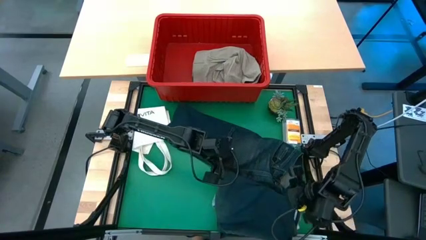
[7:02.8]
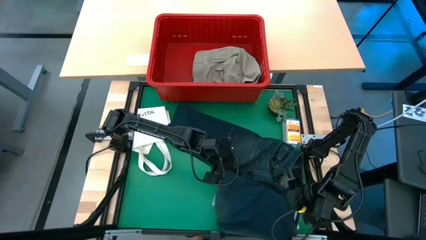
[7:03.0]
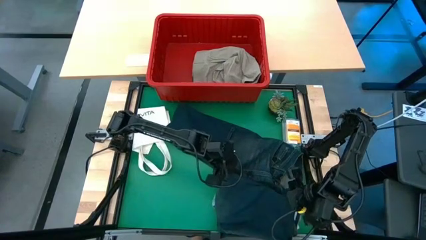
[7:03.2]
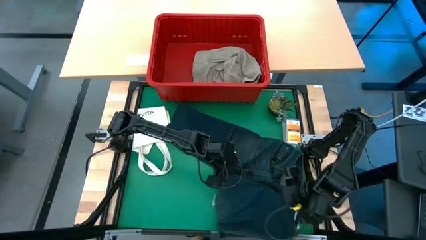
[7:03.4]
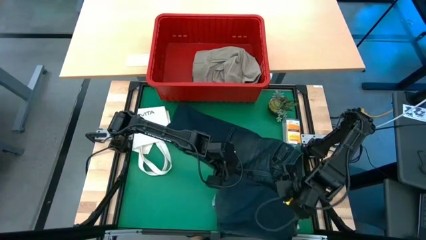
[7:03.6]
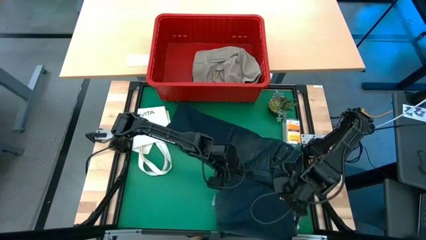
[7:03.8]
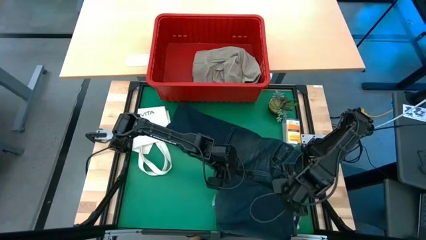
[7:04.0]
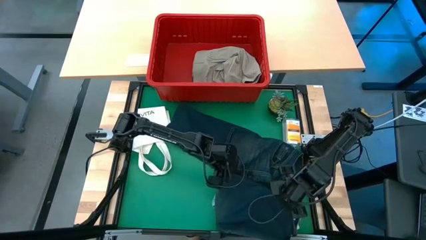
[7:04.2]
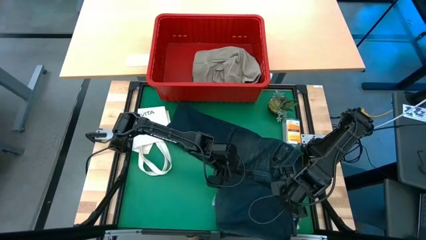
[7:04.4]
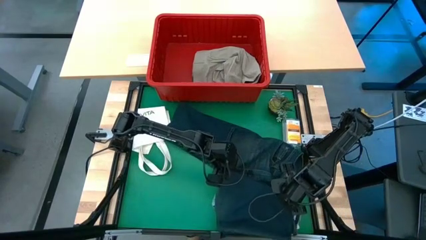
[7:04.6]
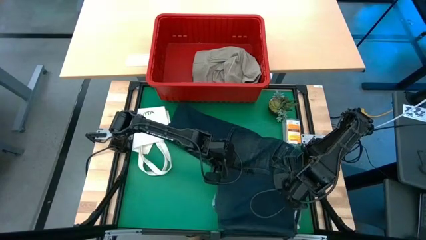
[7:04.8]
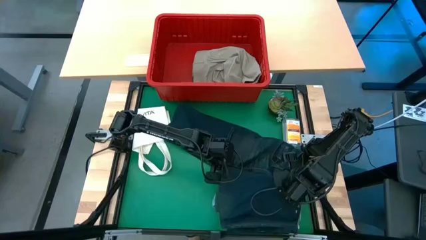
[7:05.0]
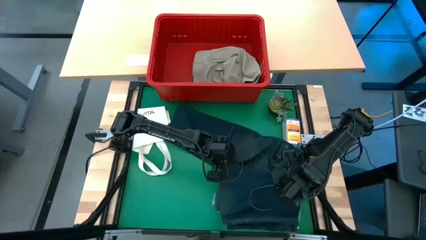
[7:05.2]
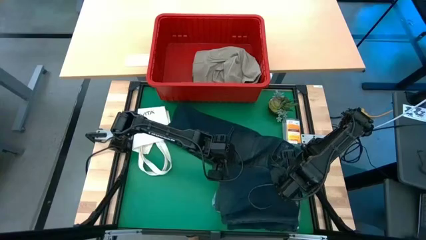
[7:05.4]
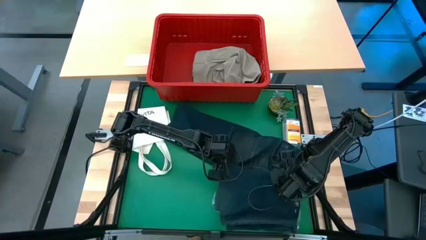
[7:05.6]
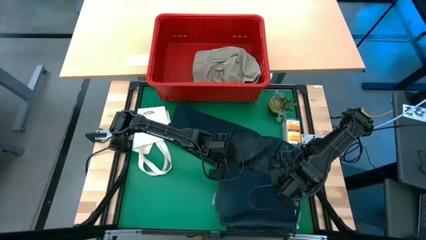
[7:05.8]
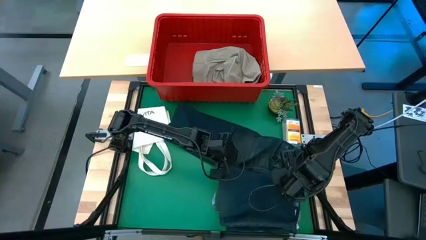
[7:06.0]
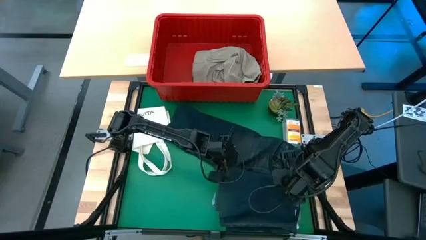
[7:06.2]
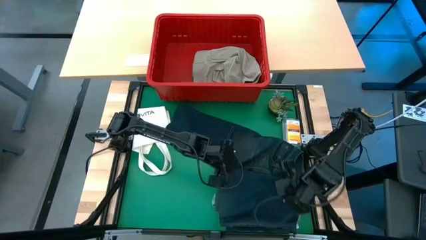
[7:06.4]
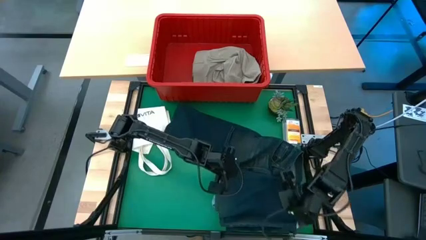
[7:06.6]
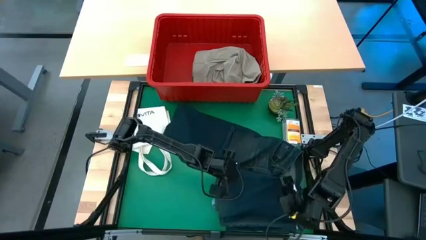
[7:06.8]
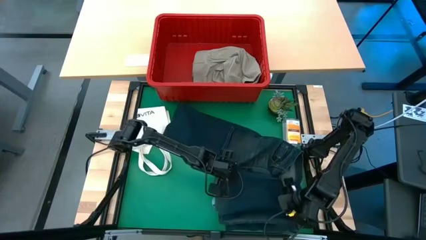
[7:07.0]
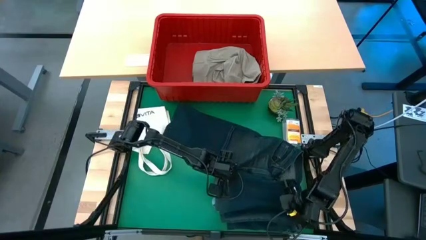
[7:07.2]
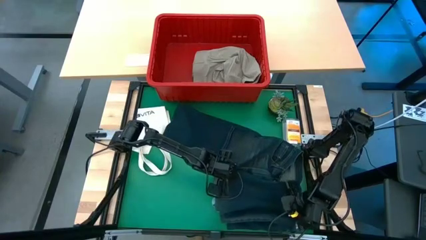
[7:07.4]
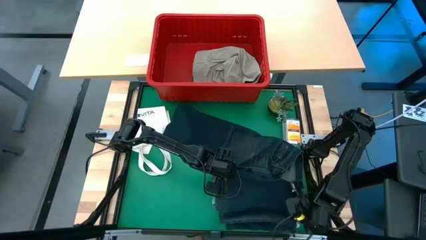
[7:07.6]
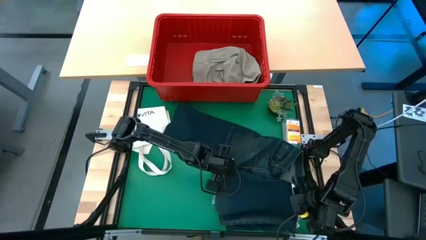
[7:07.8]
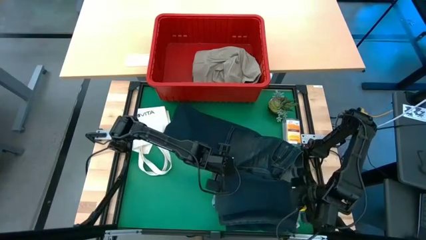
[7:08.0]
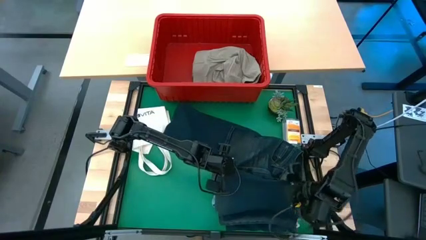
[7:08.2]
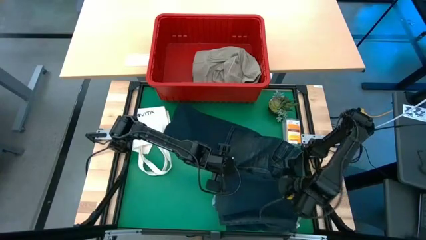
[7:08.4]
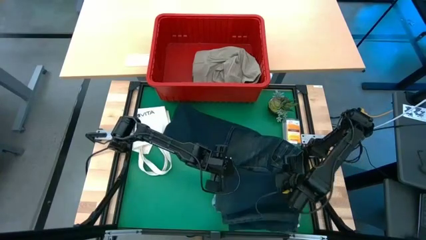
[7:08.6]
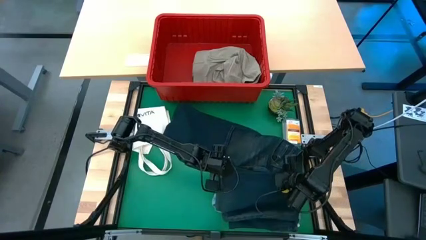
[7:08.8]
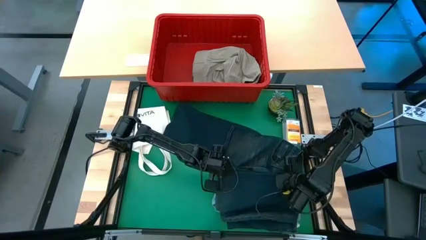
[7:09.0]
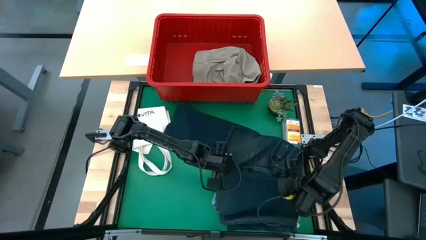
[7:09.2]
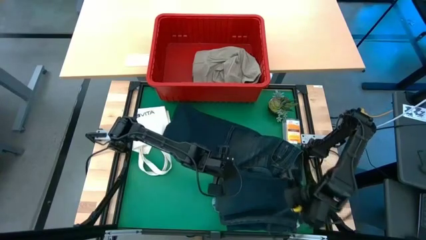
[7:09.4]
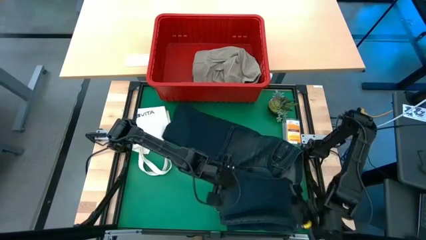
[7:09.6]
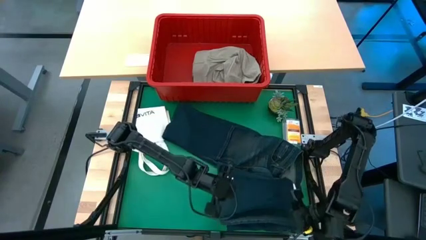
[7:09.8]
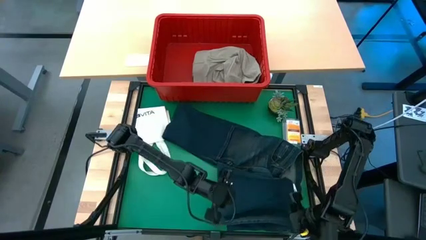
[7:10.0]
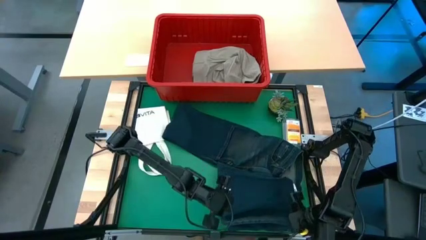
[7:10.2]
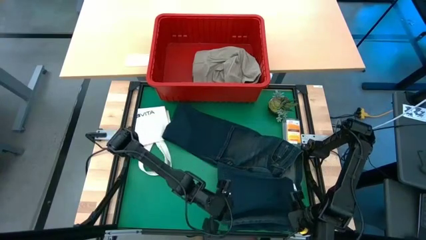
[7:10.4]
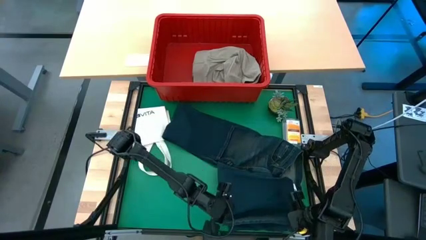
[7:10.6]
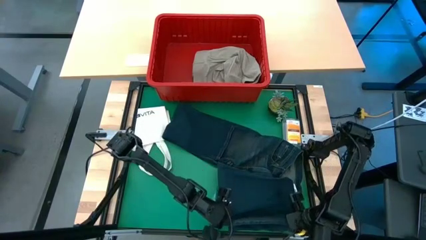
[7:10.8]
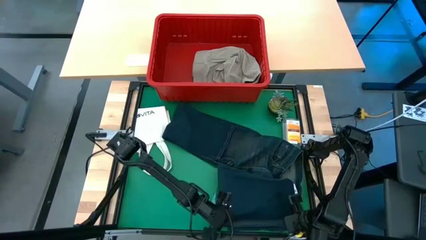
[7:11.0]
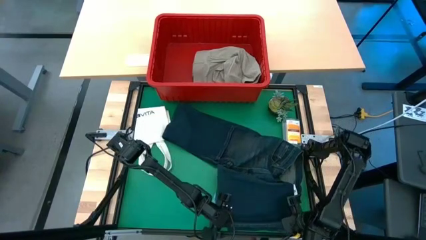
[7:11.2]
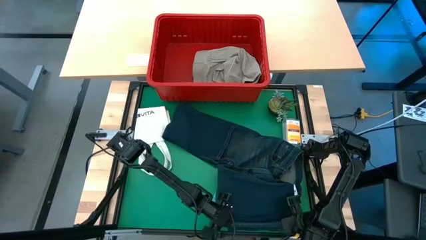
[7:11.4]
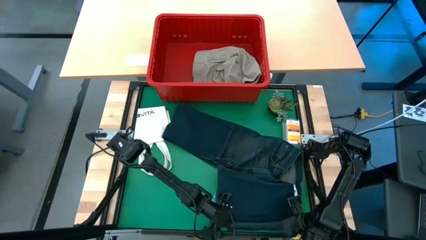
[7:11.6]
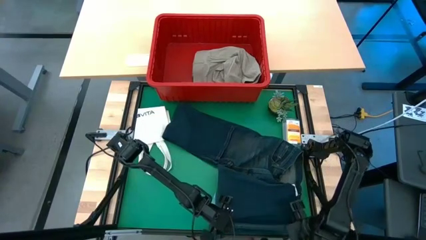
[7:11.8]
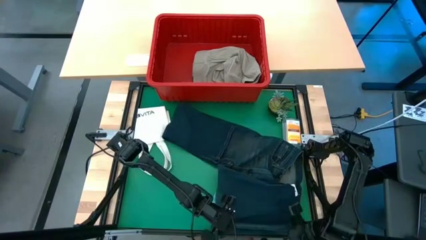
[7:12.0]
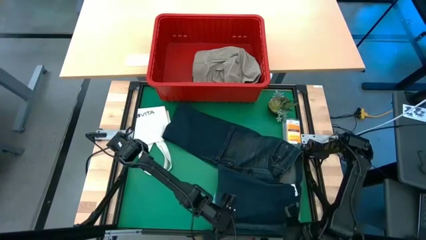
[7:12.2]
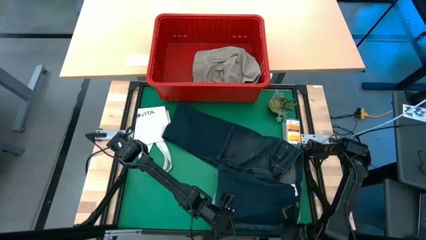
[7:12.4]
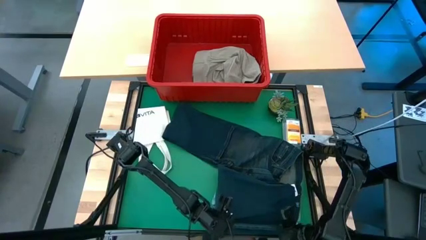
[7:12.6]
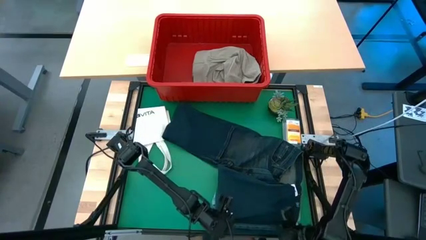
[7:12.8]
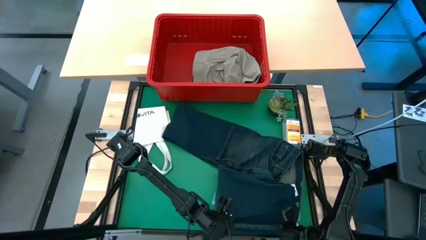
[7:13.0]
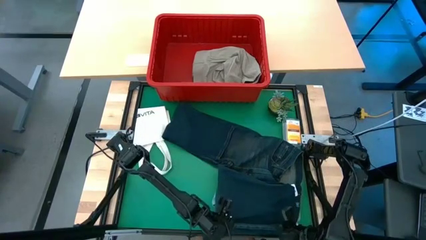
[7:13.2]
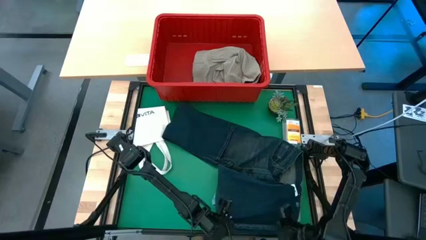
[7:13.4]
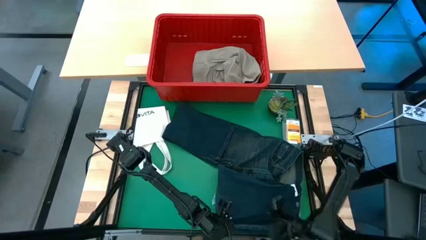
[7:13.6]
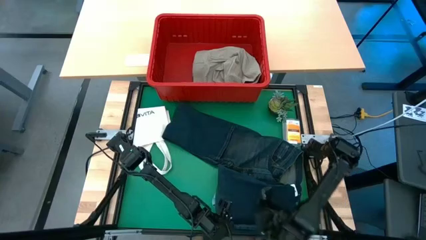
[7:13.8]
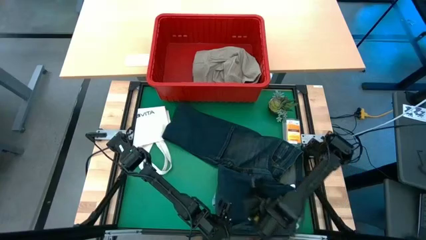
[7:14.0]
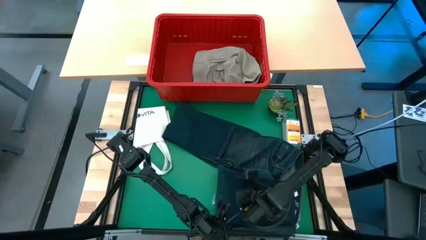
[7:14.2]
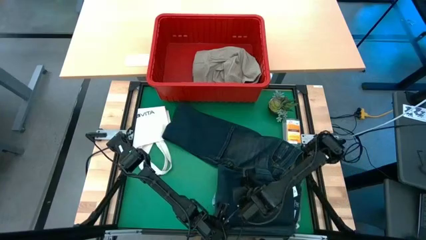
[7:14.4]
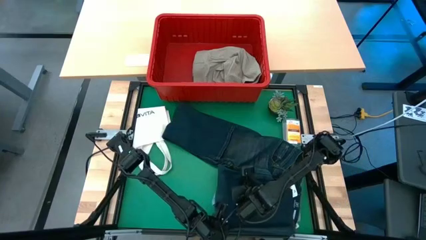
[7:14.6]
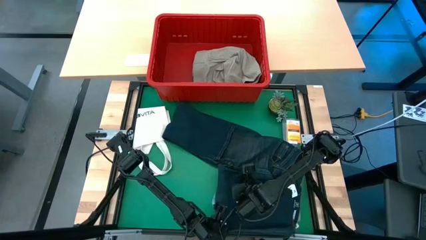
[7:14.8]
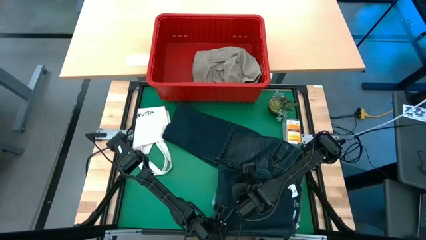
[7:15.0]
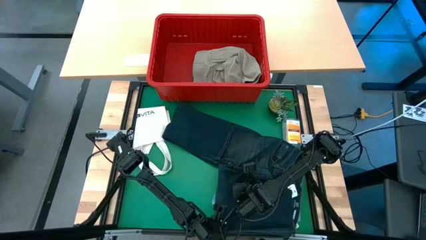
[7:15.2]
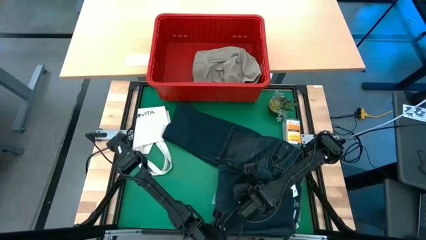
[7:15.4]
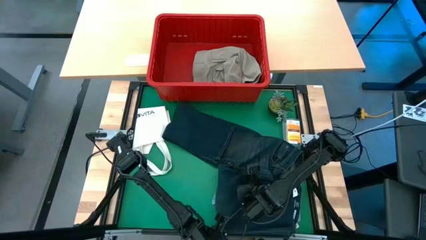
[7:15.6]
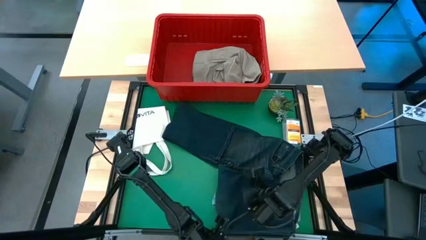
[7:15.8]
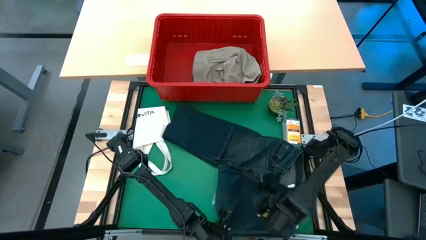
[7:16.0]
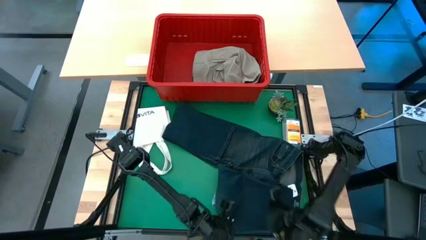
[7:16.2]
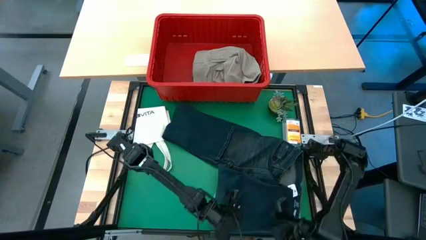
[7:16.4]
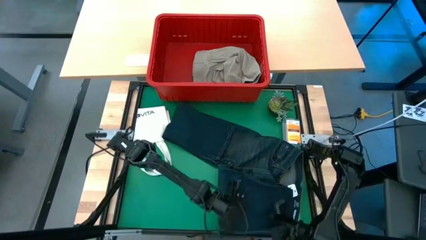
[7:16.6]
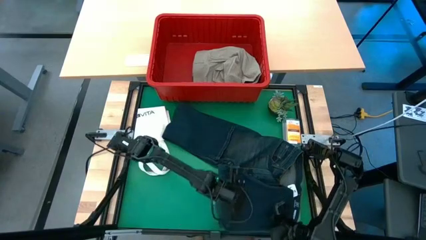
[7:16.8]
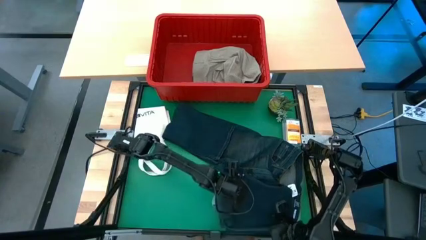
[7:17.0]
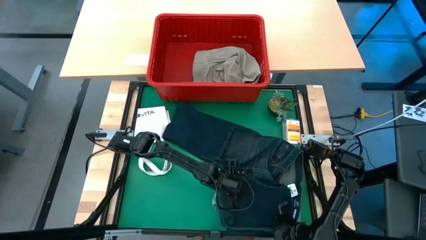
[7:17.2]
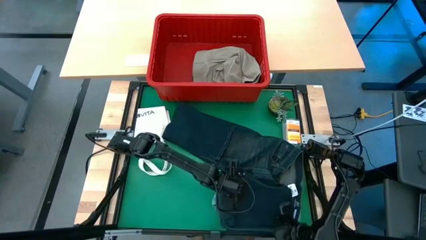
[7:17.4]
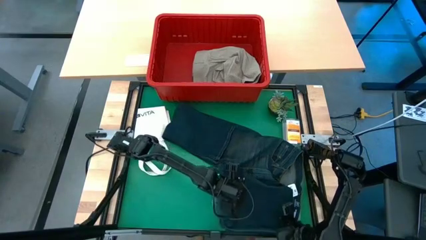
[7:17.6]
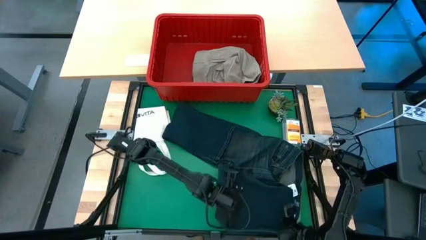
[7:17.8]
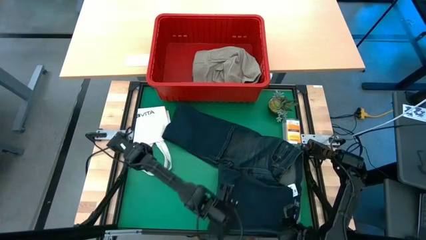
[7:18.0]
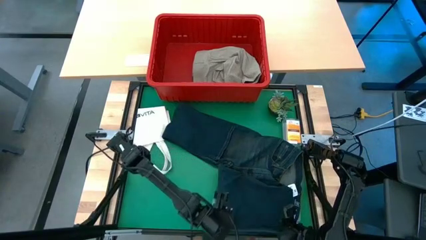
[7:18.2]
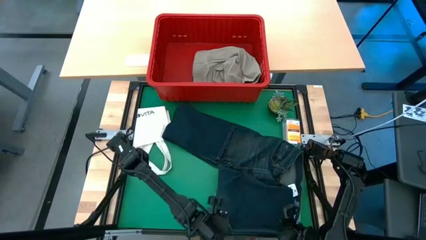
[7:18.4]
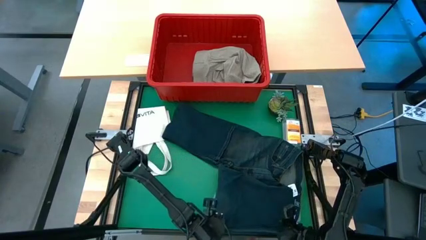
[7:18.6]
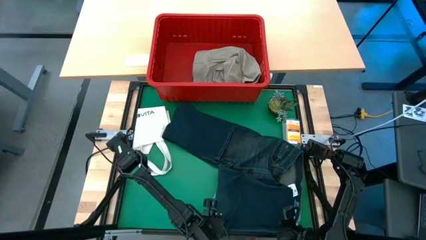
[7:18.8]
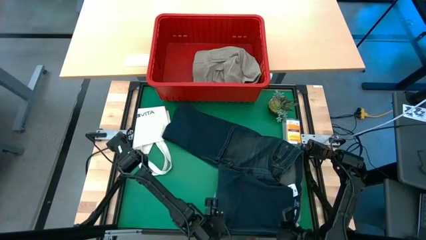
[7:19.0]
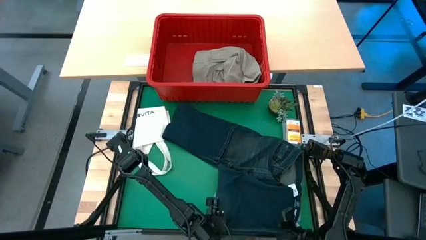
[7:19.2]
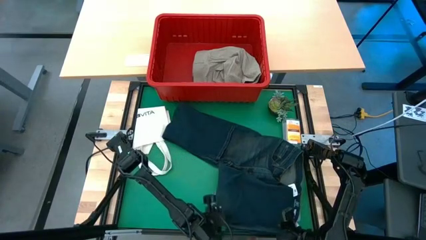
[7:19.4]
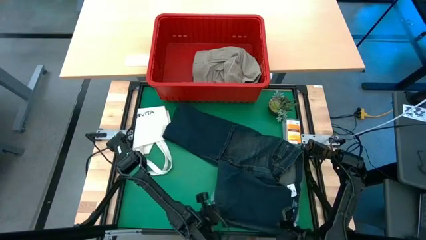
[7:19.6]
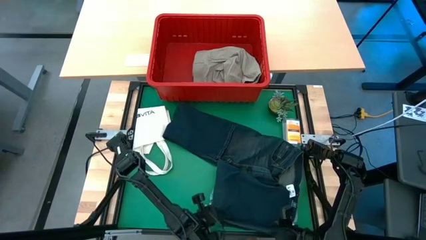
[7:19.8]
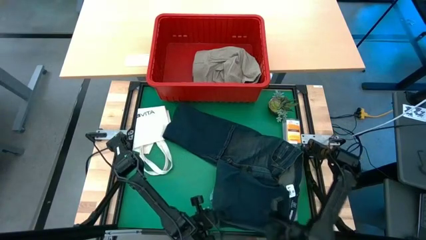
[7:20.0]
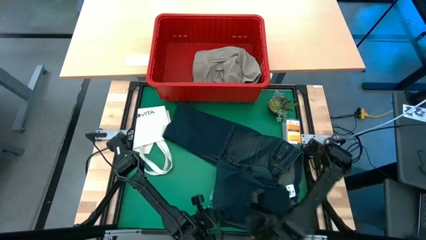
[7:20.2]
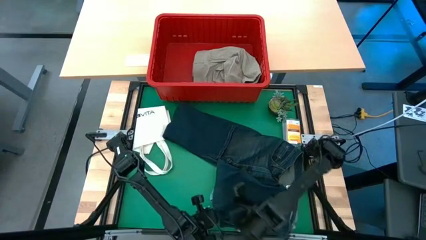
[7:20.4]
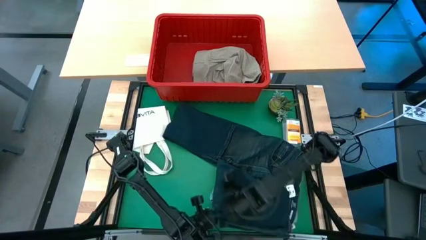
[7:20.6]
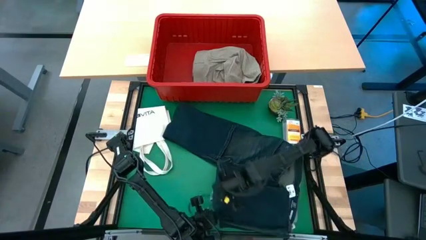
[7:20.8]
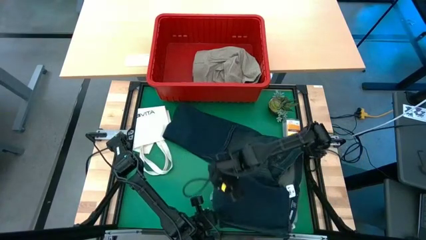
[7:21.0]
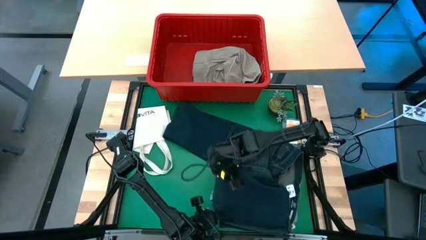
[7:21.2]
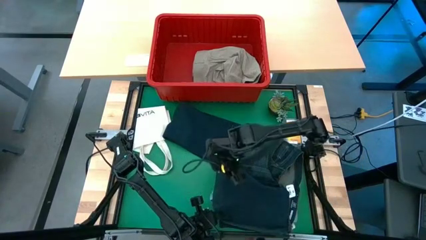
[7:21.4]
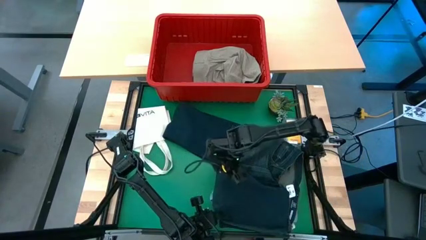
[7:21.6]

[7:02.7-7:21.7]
Task: Fold Laundry from Bin
Fold the dark blue jeans
